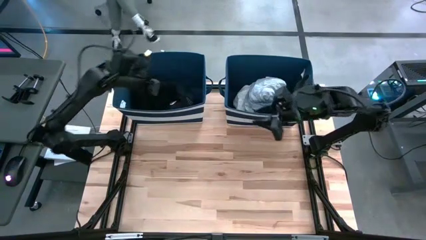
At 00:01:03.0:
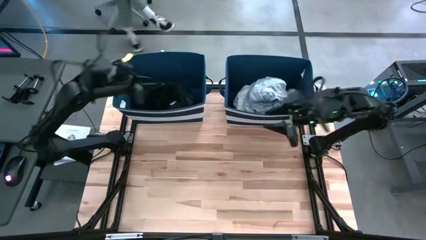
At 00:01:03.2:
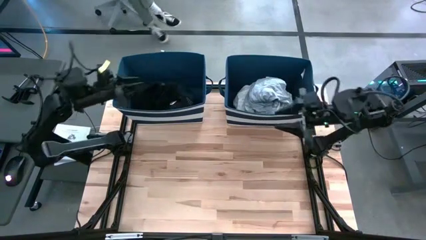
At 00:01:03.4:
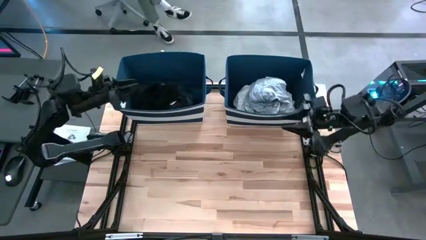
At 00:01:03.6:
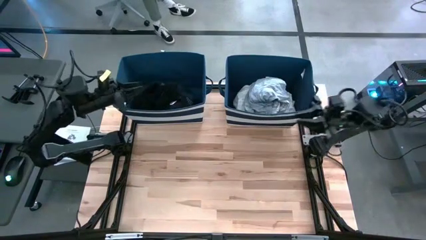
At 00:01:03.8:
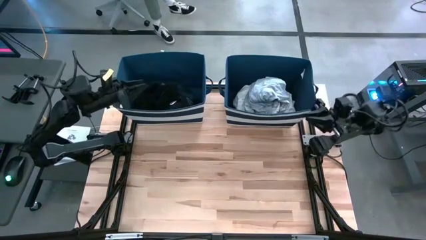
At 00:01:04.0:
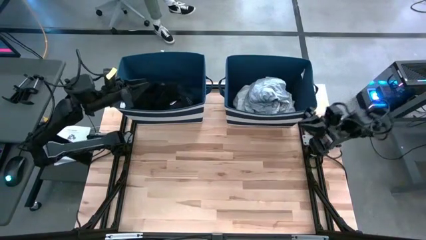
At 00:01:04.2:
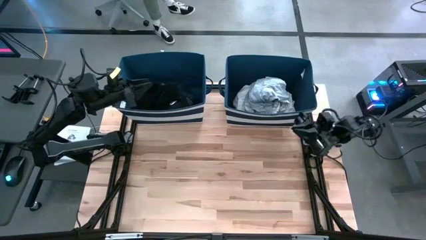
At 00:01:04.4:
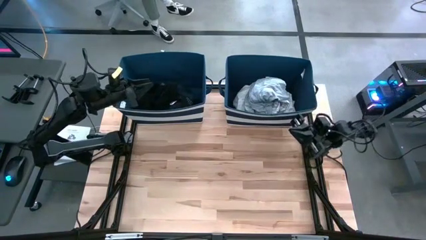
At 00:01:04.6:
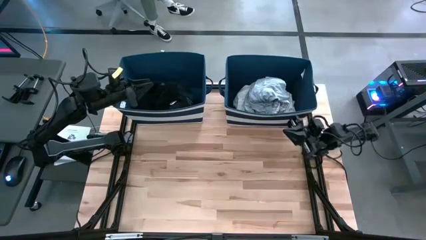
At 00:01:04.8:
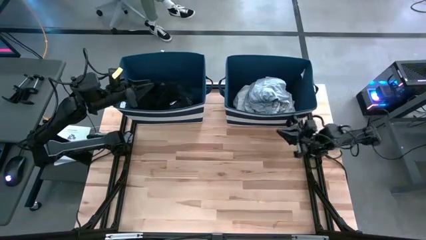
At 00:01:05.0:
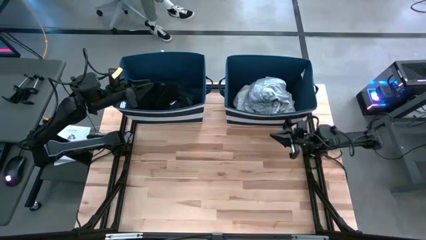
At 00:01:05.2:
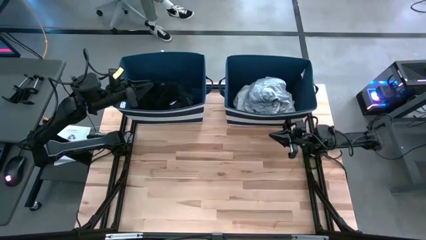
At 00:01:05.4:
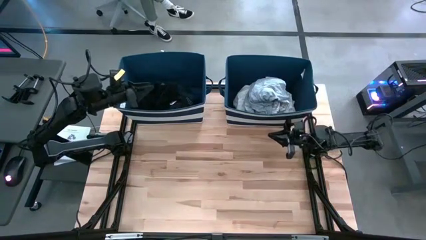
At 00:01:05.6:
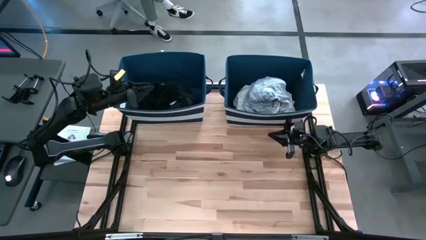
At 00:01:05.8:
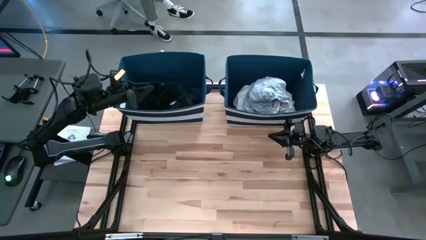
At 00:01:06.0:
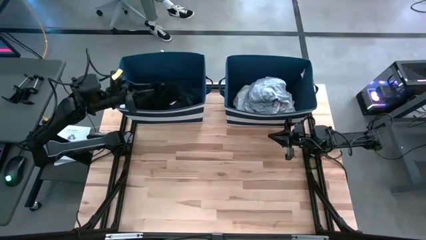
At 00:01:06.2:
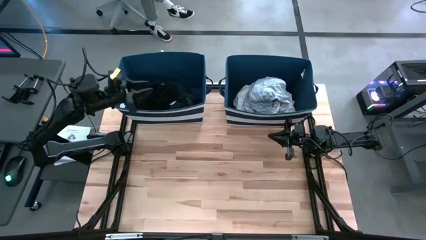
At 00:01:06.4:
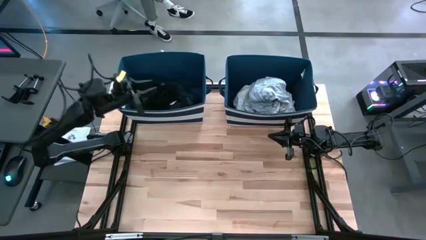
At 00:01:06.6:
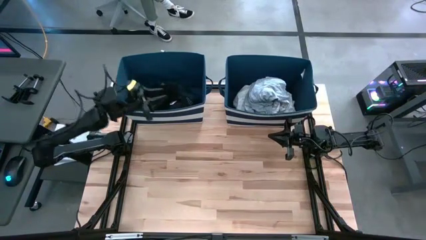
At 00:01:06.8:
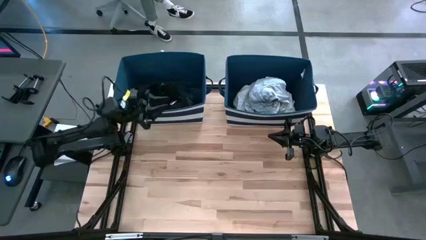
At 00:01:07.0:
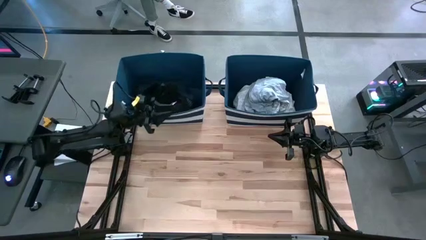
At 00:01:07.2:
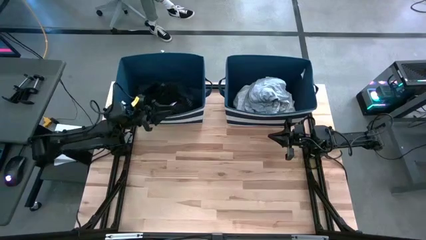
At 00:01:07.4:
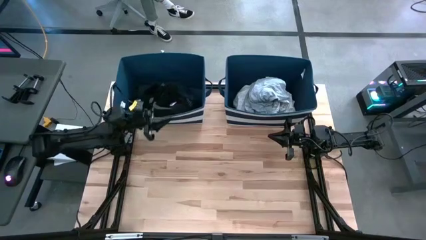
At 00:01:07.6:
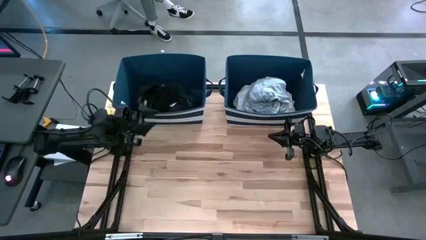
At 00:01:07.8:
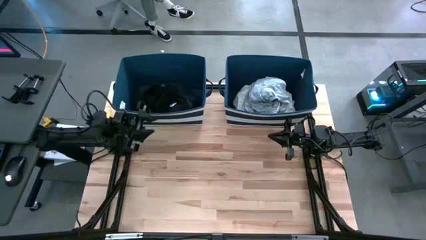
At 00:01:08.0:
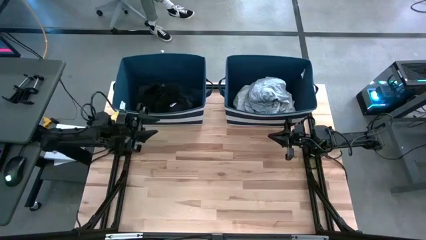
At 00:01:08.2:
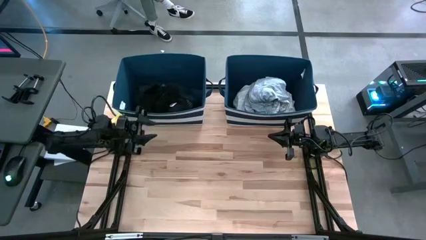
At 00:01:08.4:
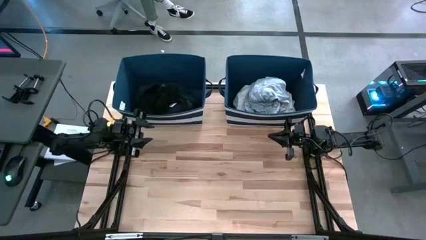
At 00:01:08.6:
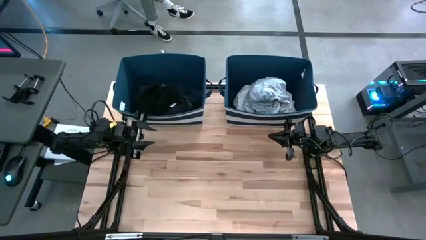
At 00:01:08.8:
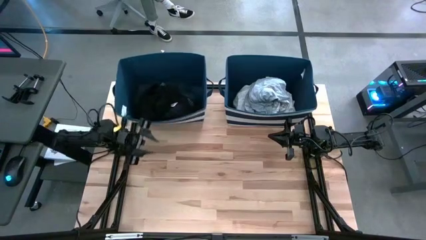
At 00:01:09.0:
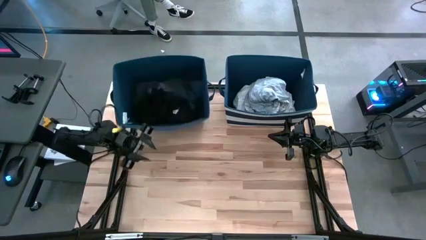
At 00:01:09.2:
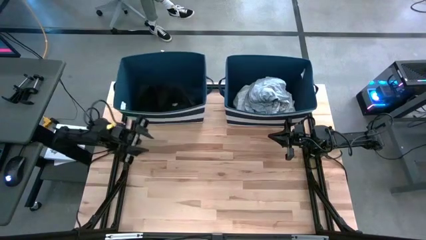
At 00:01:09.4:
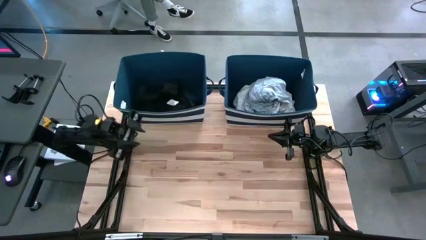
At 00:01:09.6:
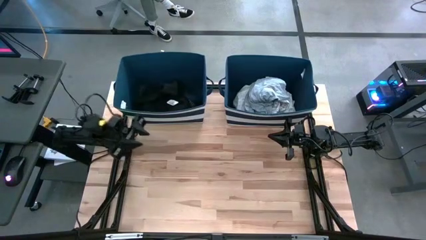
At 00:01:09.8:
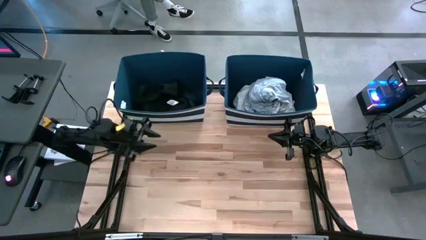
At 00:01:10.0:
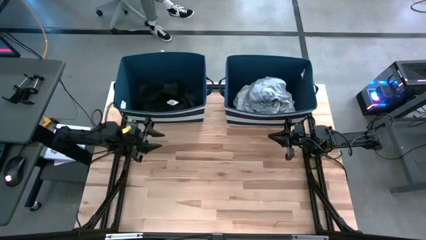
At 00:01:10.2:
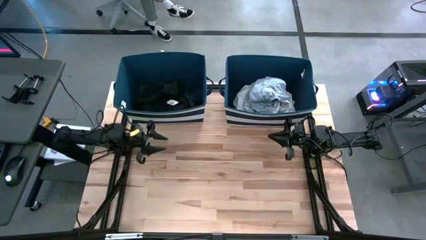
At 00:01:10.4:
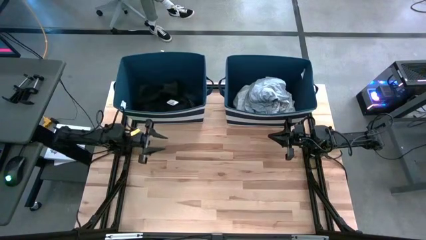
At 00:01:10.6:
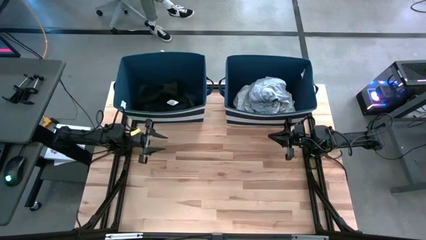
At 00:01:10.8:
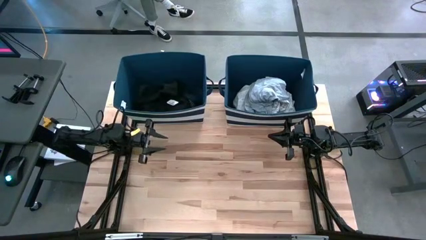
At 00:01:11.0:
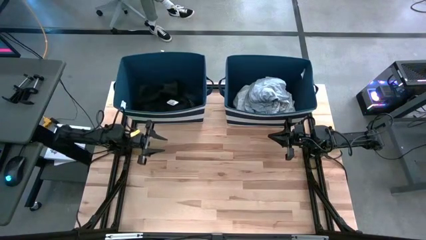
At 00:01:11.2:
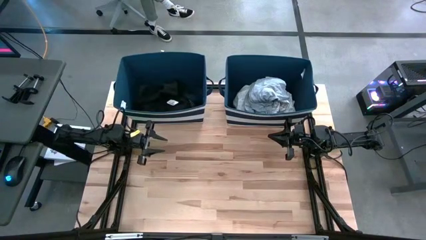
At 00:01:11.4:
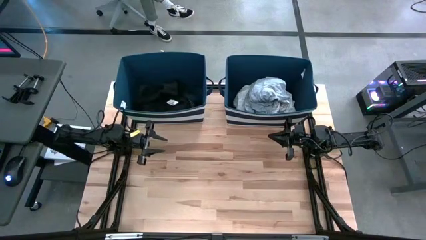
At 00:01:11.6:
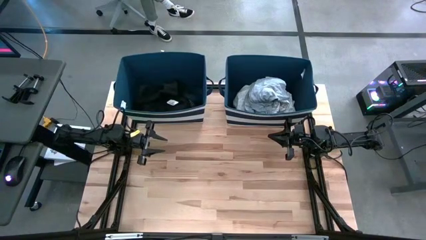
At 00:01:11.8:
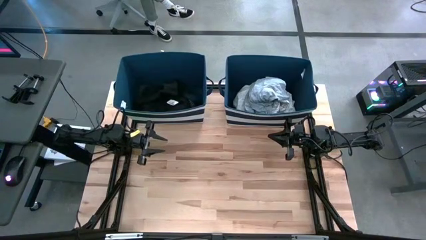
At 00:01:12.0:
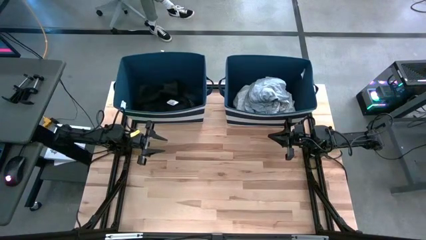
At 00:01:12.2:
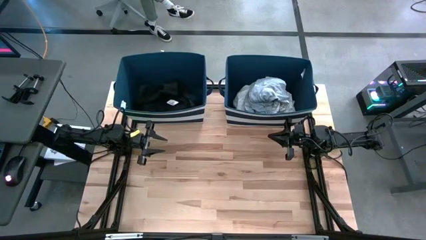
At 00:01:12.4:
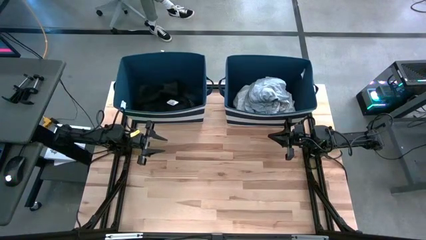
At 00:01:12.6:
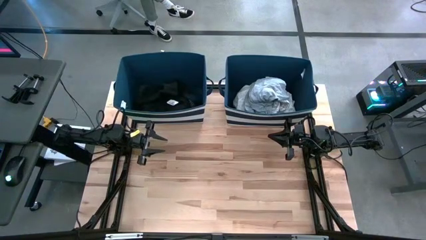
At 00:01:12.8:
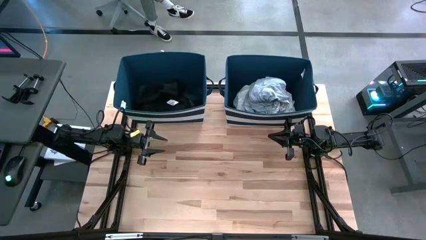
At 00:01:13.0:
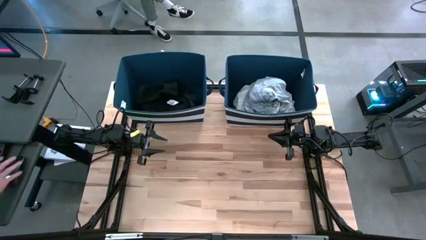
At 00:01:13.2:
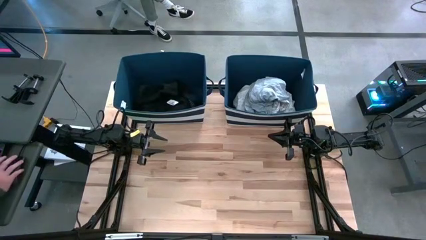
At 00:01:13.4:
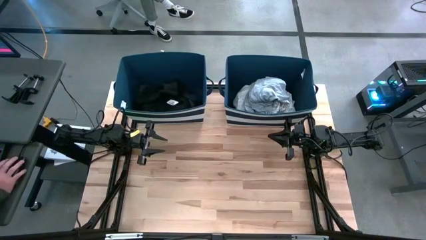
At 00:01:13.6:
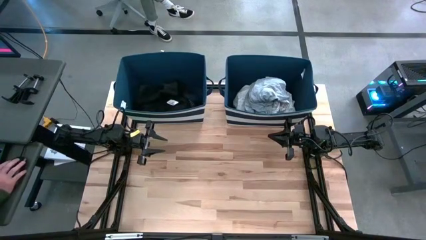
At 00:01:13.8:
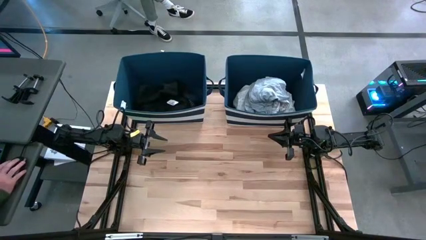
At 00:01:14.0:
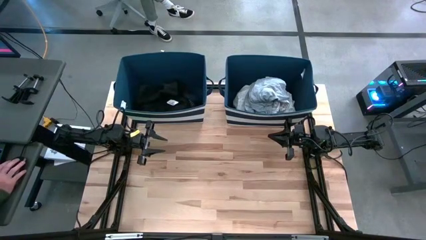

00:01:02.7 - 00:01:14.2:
Task: Sort clothes
Return to Home Position

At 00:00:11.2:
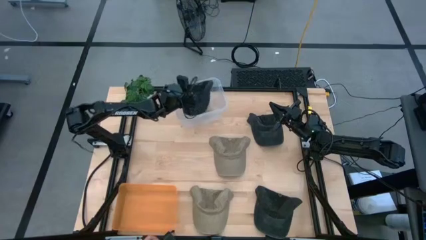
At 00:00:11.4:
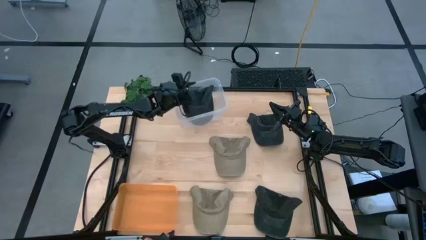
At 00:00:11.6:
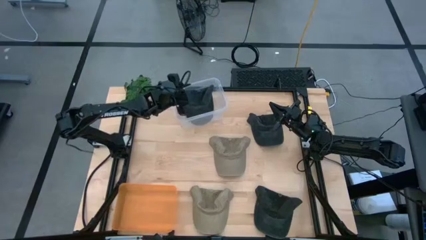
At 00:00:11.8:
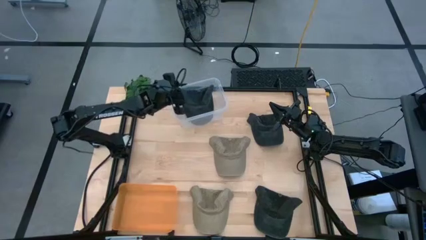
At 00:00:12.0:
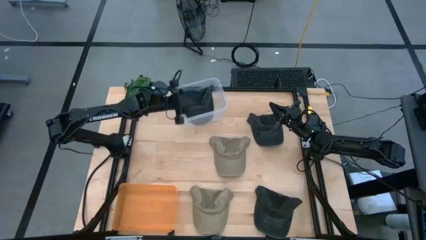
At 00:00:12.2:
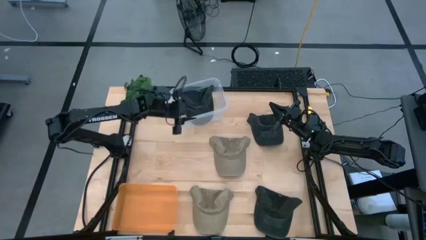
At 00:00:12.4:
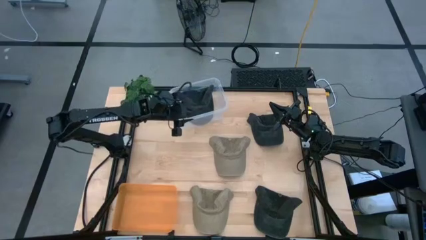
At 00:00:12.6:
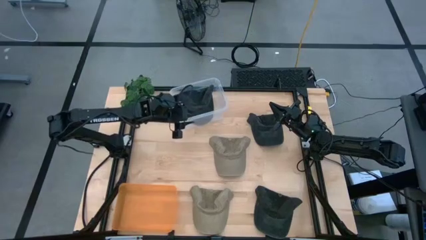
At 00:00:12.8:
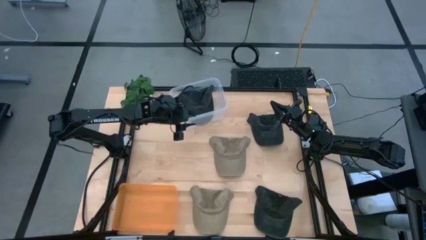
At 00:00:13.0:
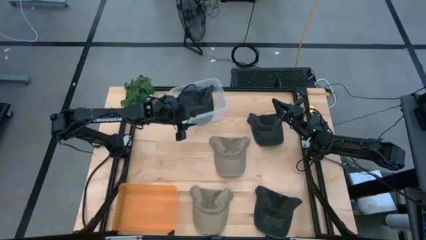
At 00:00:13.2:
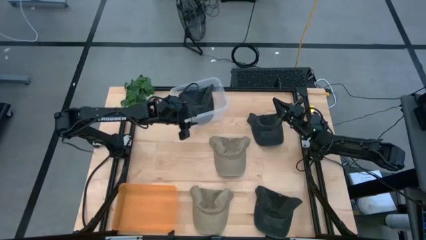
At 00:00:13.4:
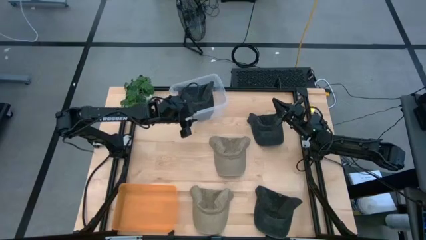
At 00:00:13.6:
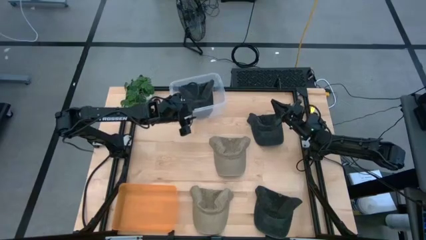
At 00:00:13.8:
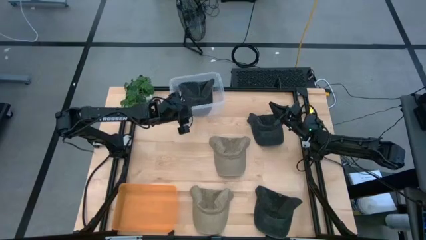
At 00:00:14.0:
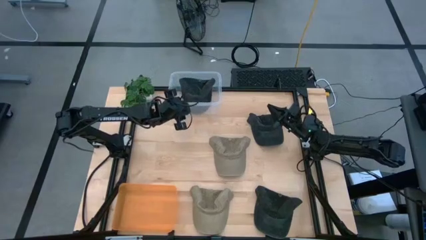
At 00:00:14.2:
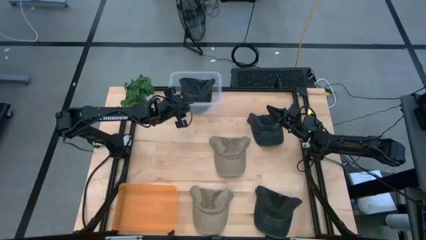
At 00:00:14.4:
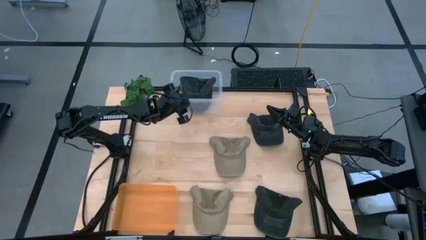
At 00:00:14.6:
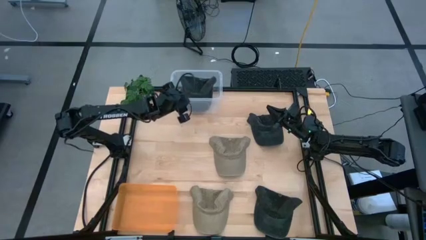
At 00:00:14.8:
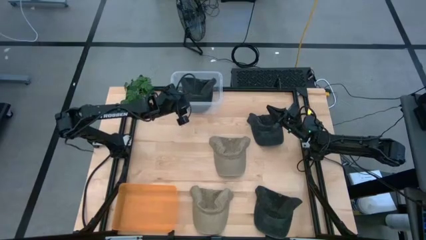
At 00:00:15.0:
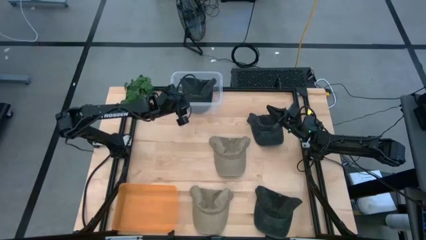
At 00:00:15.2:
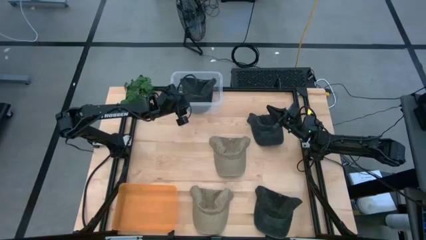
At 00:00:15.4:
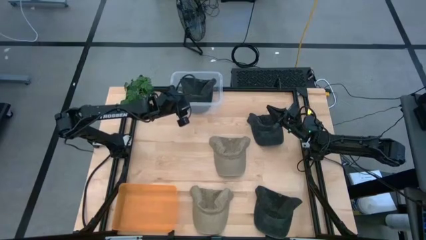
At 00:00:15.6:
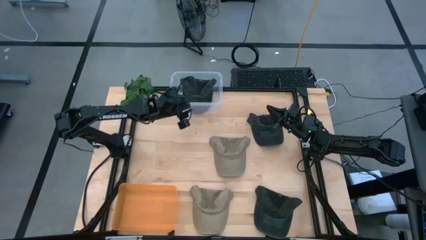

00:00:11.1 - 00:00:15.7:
Task: Pick & Place hat
Adjust the transparent bin
